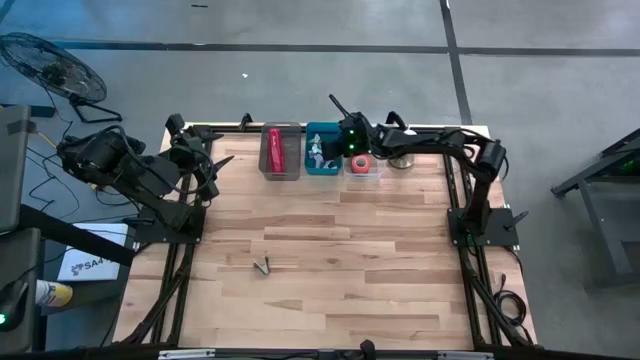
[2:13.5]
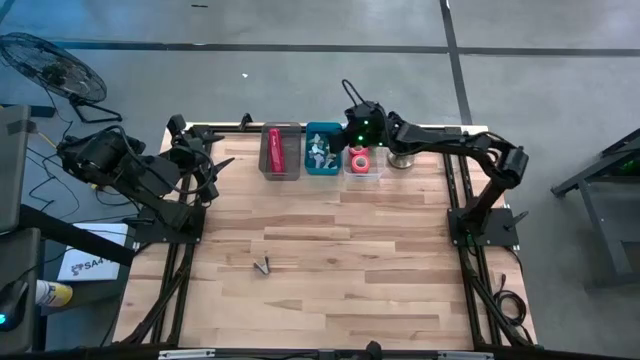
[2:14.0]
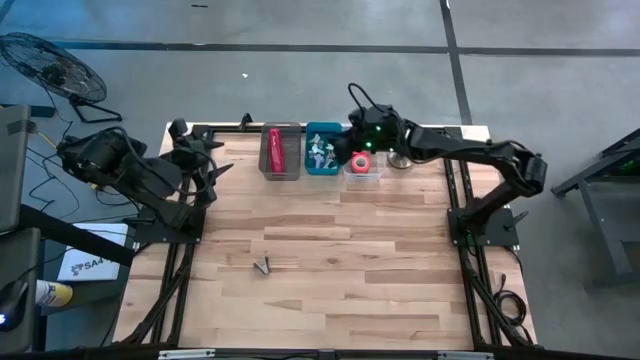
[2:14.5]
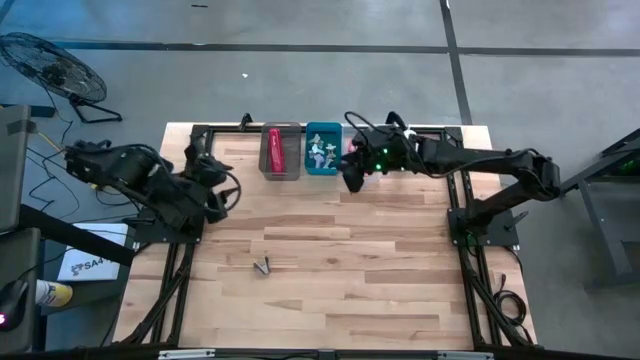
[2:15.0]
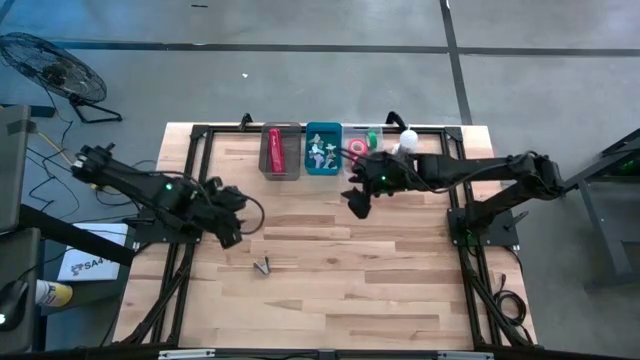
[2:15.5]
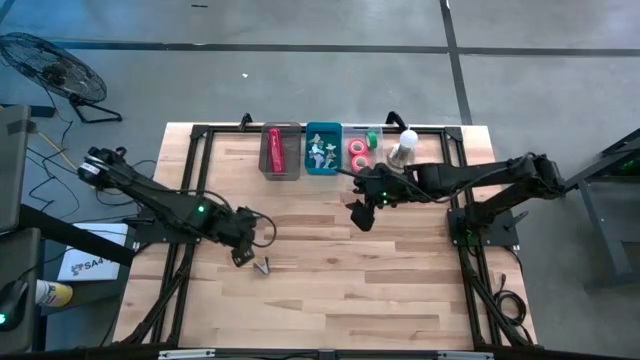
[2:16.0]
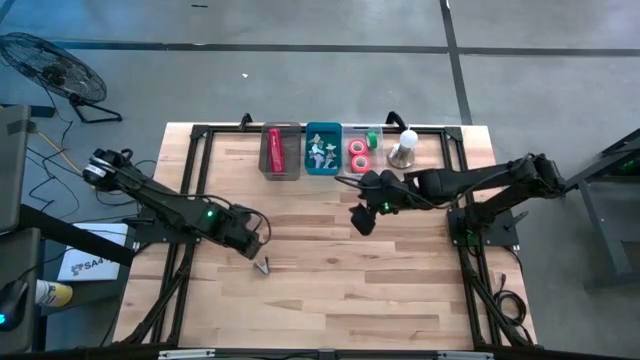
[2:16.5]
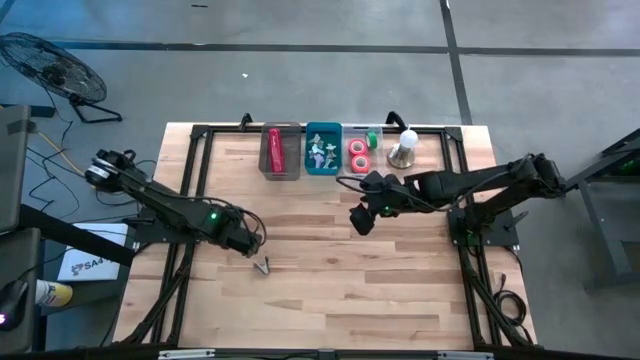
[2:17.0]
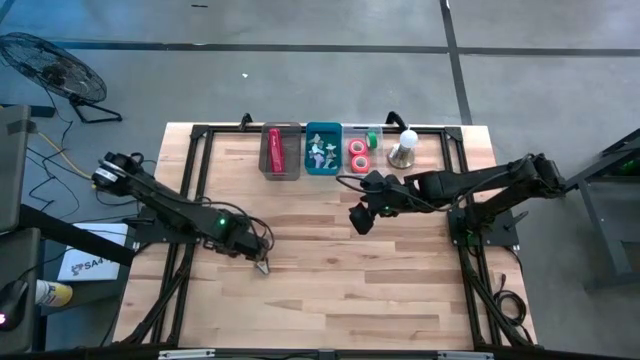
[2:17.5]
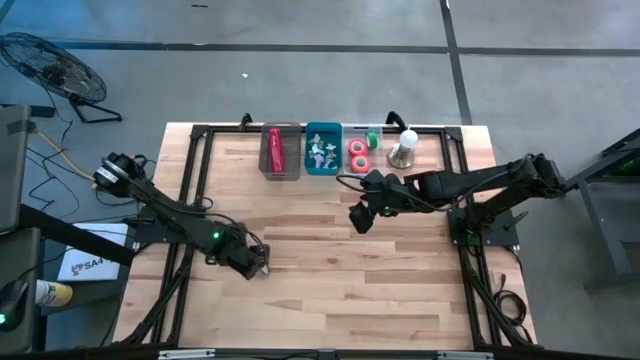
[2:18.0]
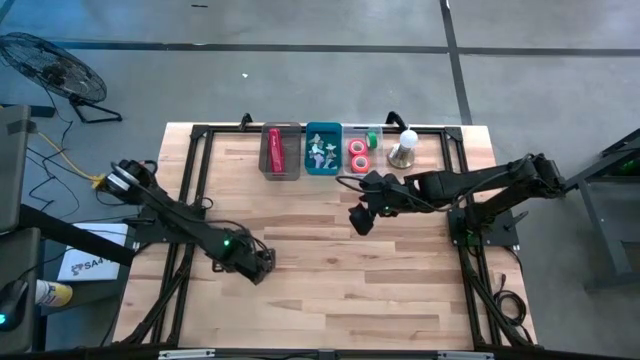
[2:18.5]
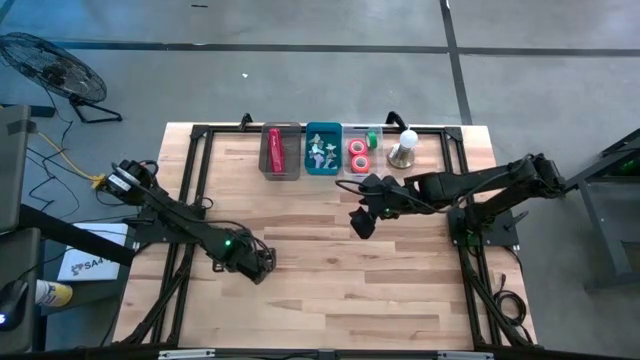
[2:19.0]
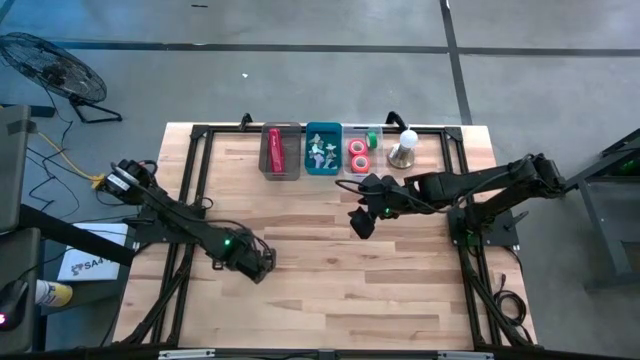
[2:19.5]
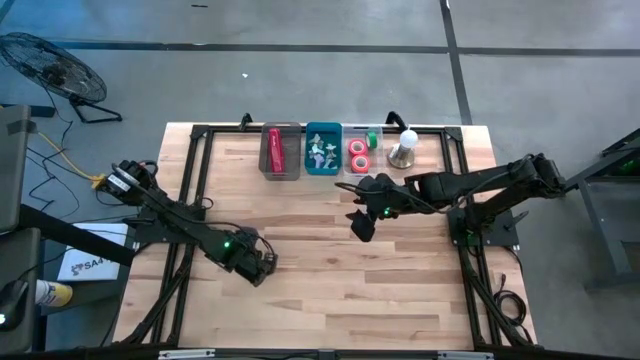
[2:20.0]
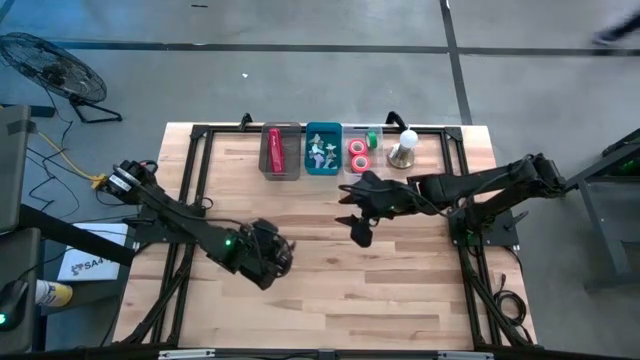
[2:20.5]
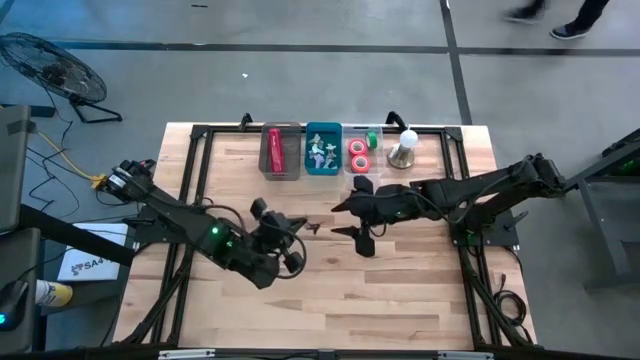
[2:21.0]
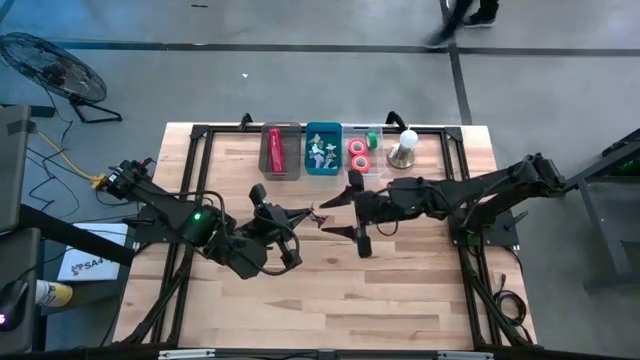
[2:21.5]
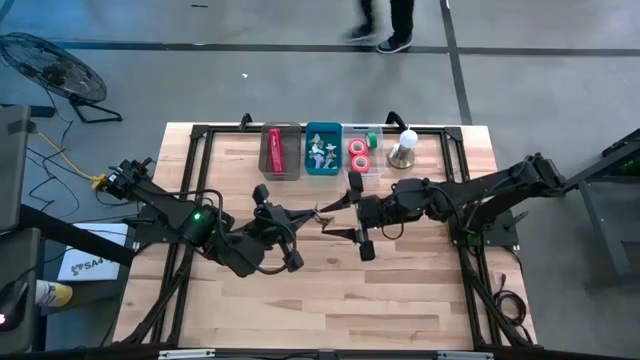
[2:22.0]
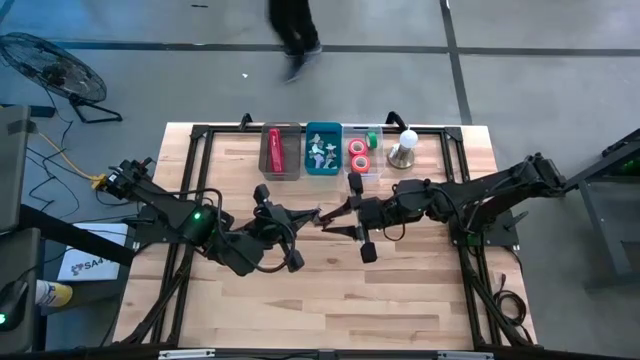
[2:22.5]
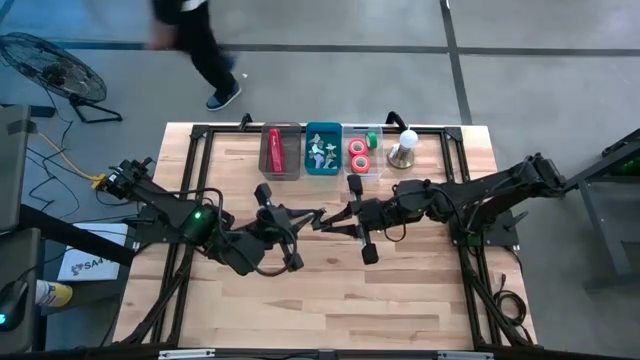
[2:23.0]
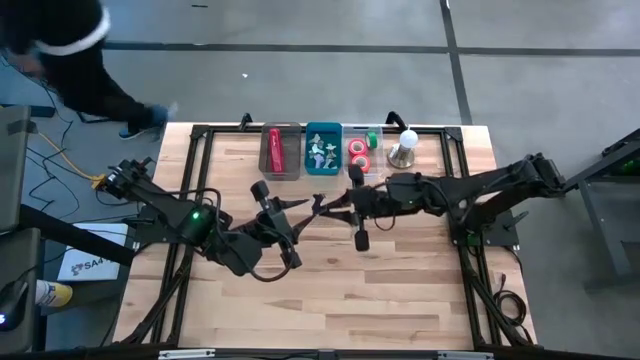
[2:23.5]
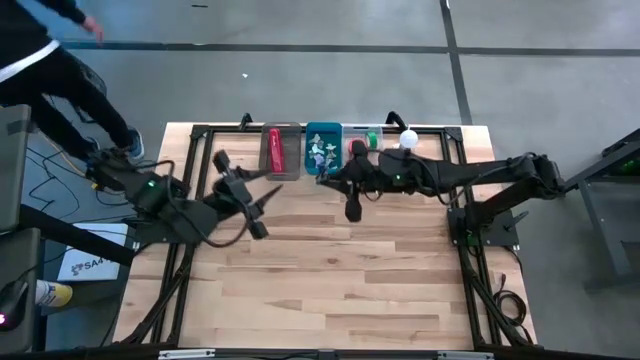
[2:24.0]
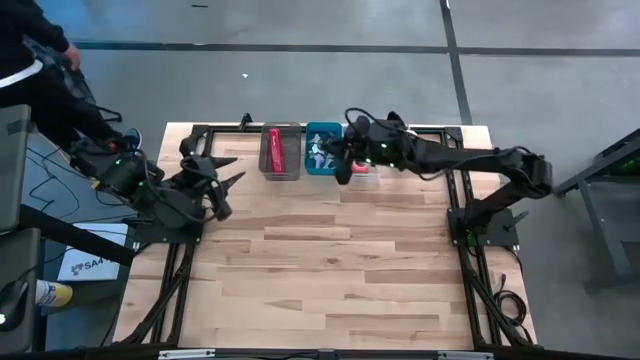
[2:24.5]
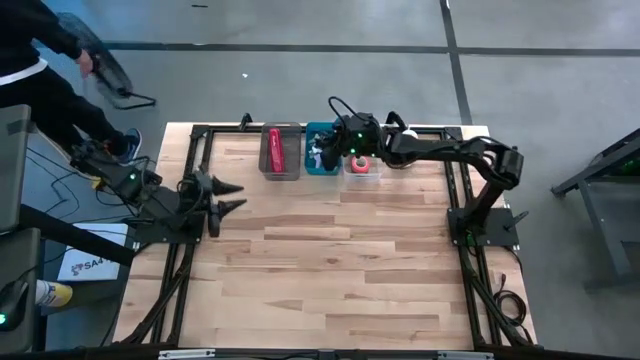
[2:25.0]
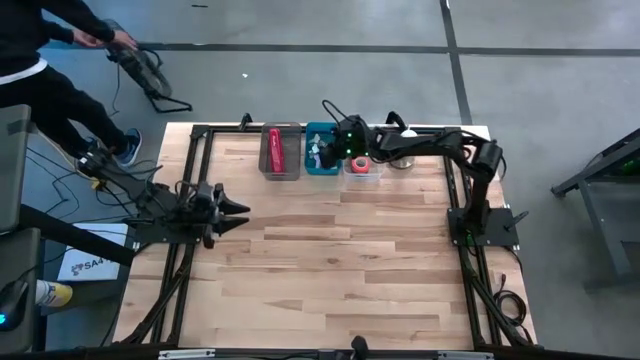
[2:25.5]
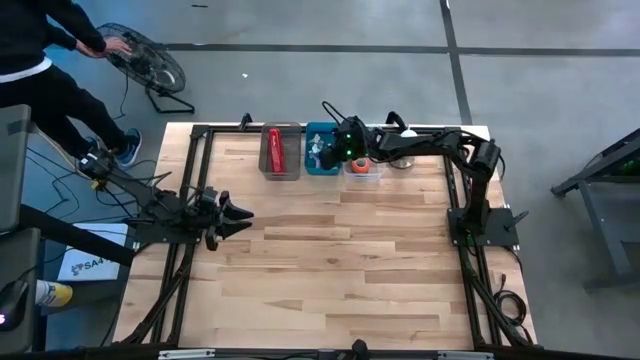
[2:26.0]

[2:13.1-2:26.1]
Task: Pick and place Stapler, Stapler remover, tape
Put the black staple remover into the blue bin

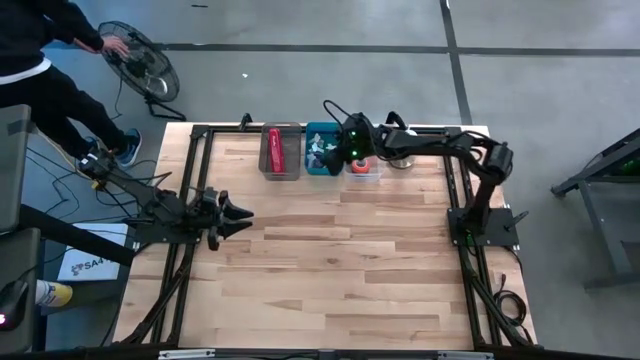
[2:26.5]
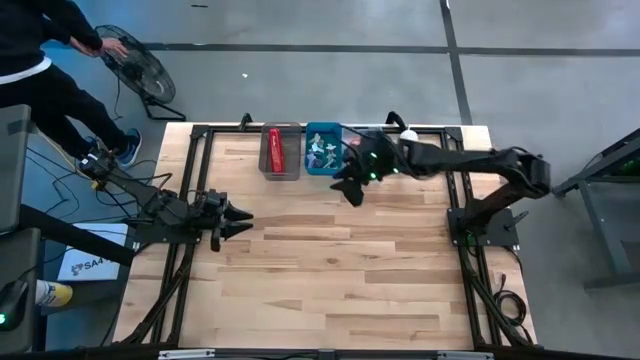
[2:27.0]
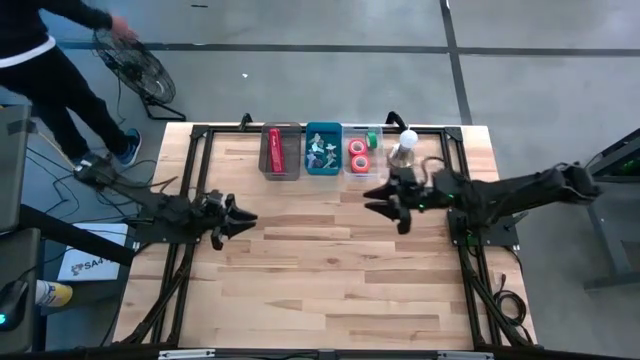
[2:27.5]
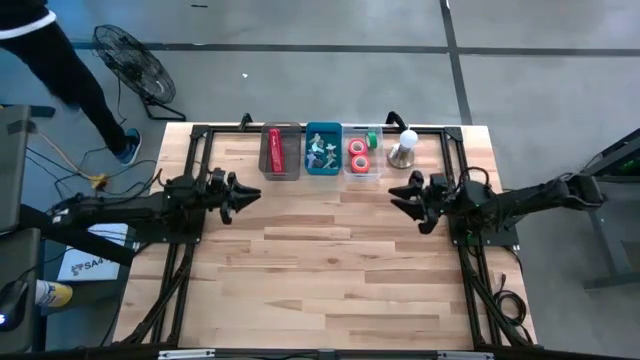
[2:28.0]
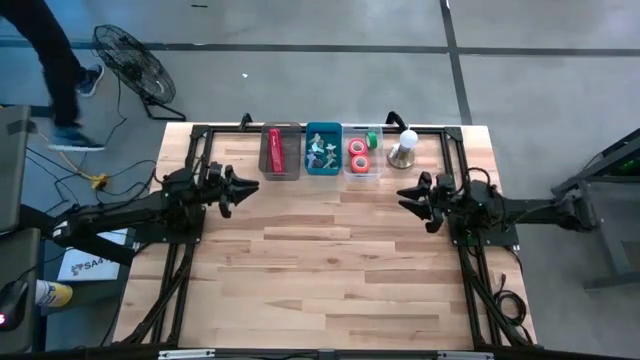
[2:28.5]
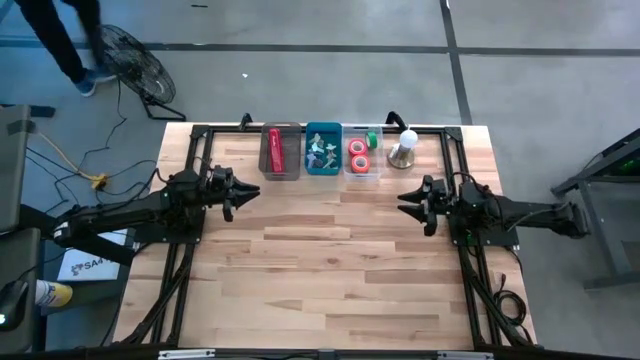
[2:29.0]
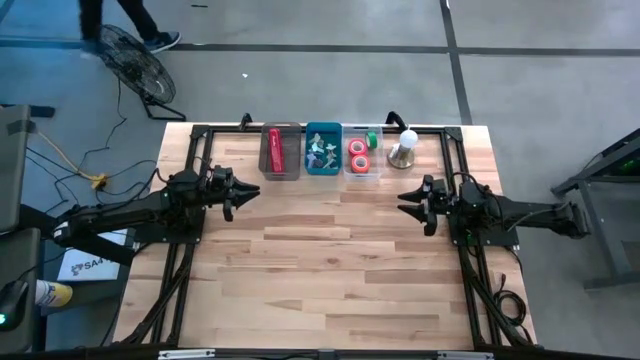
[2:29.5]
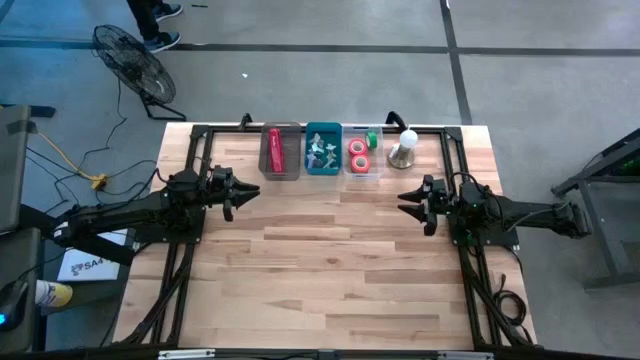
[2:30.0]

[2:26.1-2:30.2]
Return to Home Position

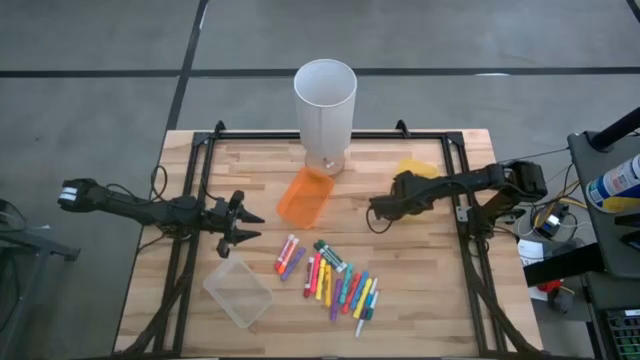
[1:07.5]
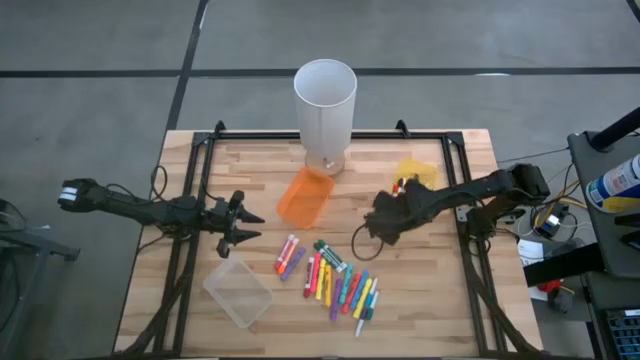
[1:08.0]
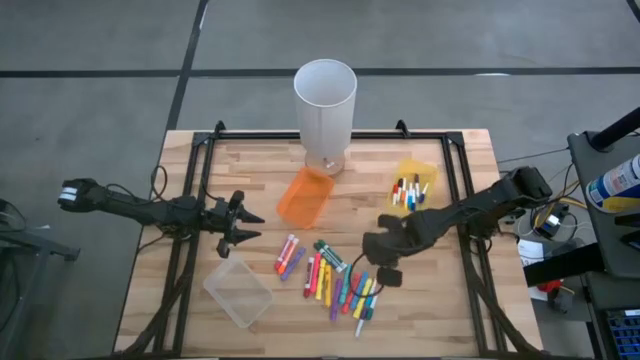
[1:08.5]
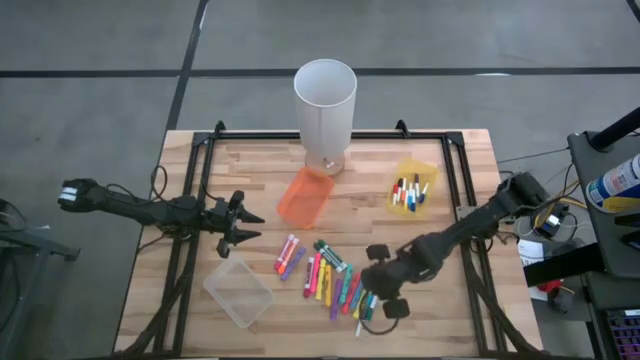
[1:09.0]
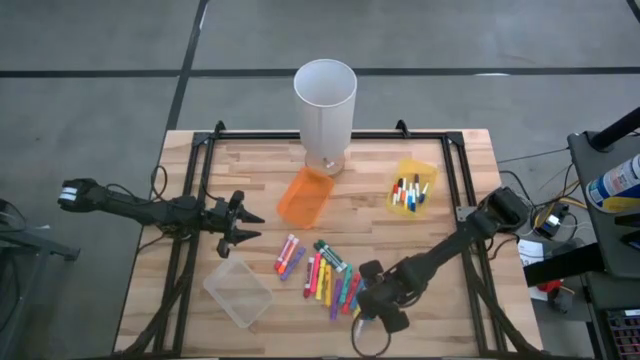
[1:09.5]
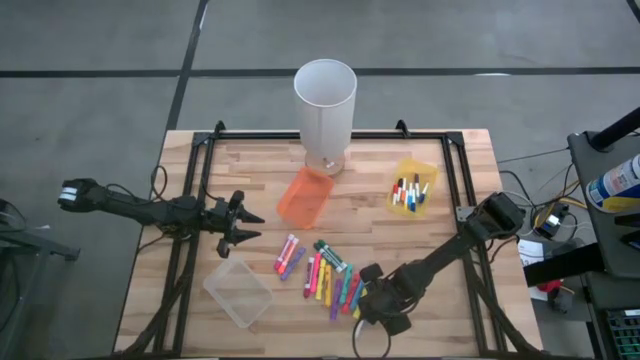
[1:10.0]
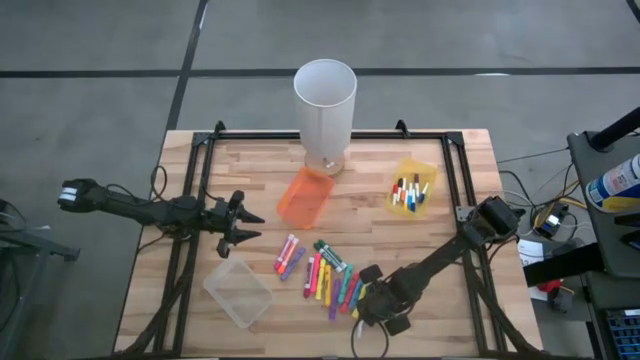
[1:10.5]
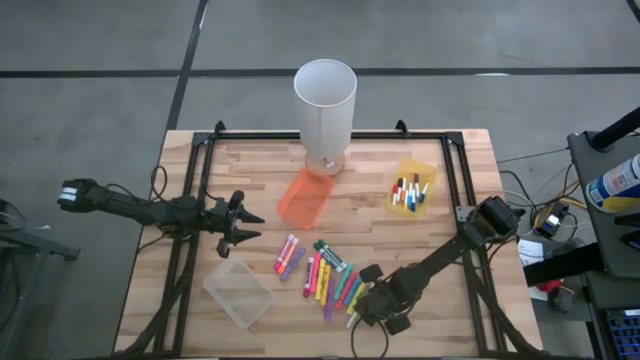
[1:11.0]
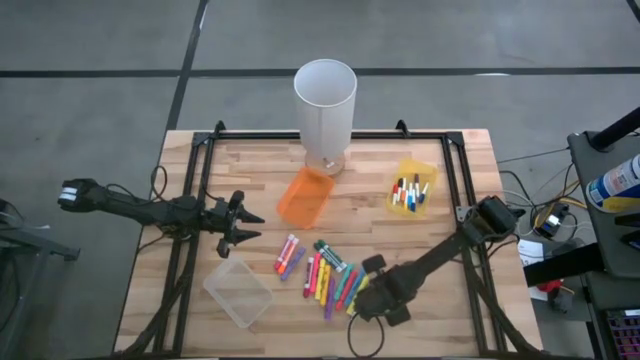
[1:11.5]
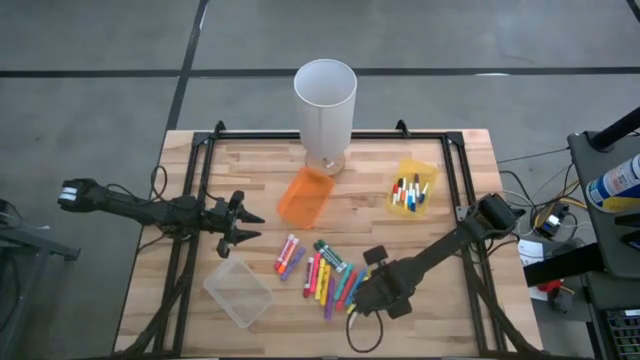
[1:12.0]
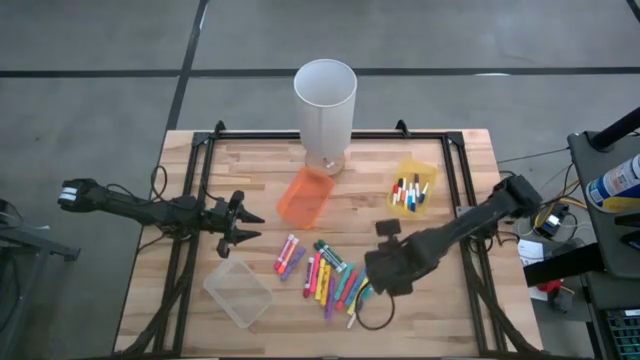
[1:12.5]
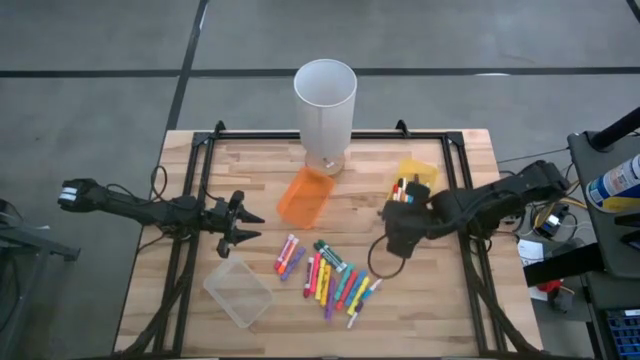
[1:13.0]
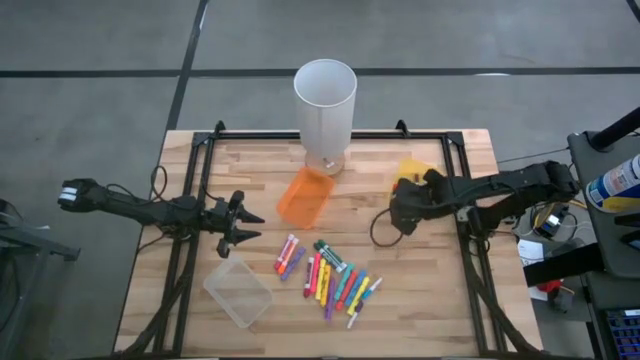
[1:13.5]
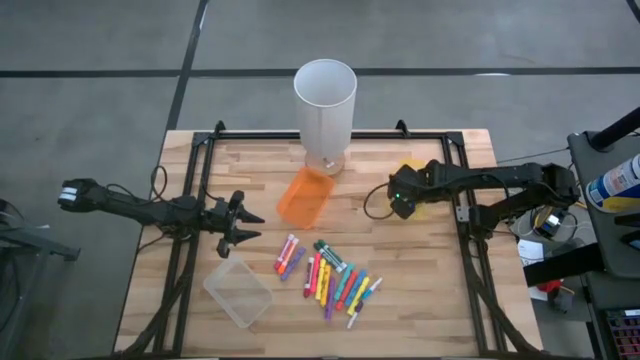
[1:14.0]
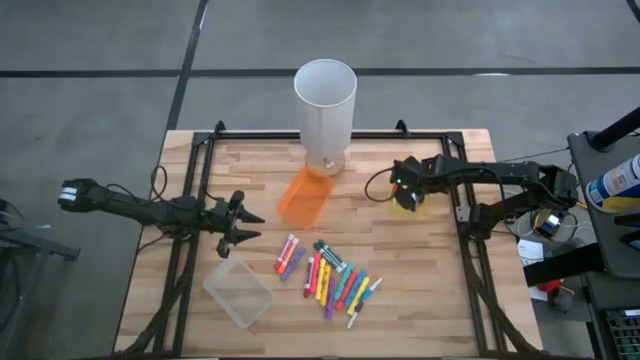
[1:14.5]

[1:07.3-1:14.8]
Task: Pick & Place Markers
Put the small green marker pen into the yellow bin
